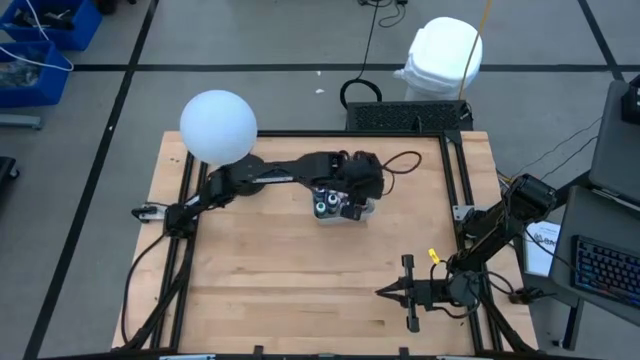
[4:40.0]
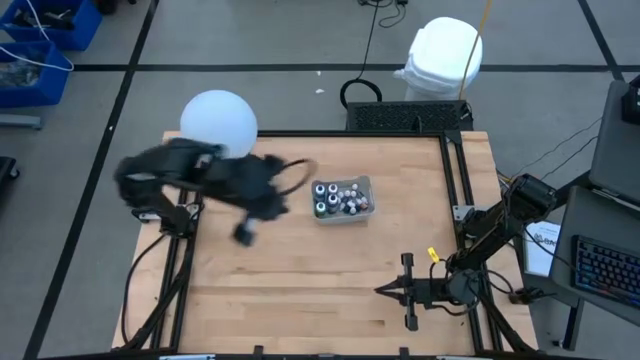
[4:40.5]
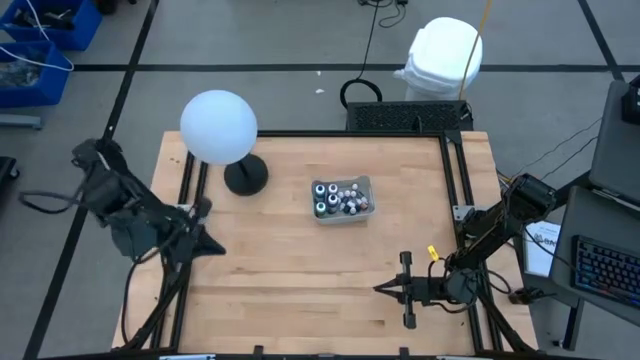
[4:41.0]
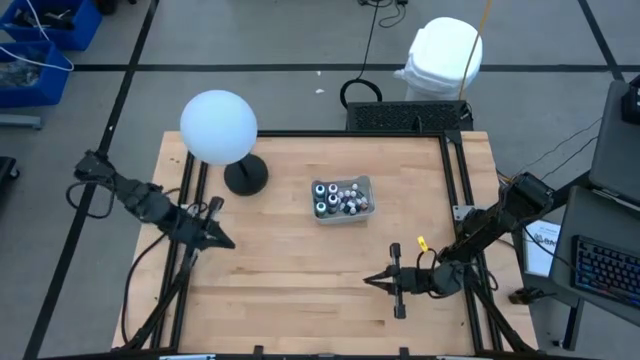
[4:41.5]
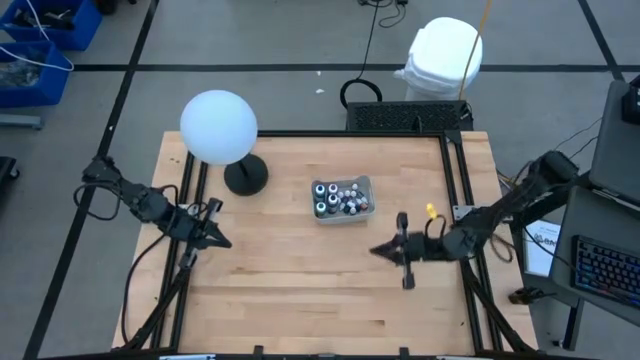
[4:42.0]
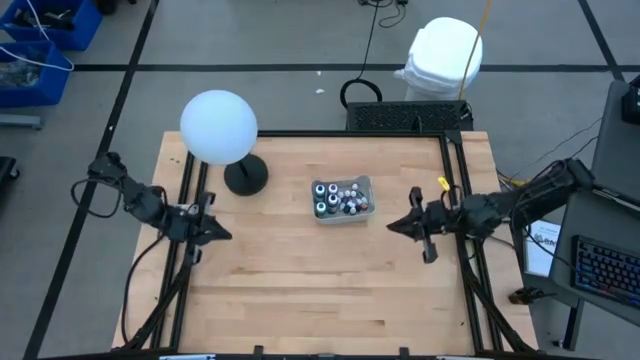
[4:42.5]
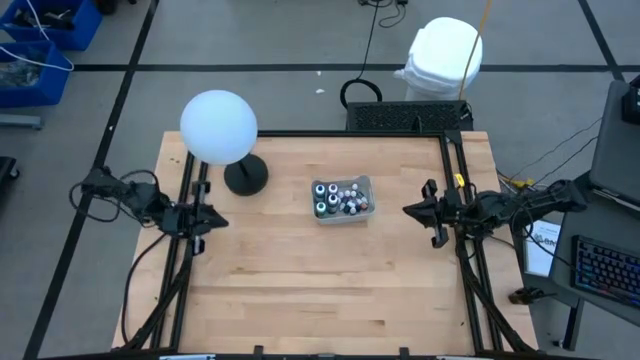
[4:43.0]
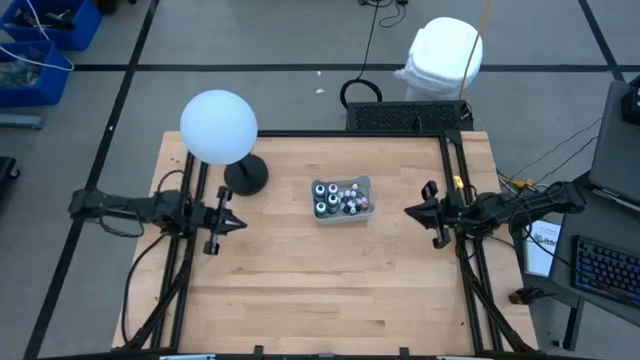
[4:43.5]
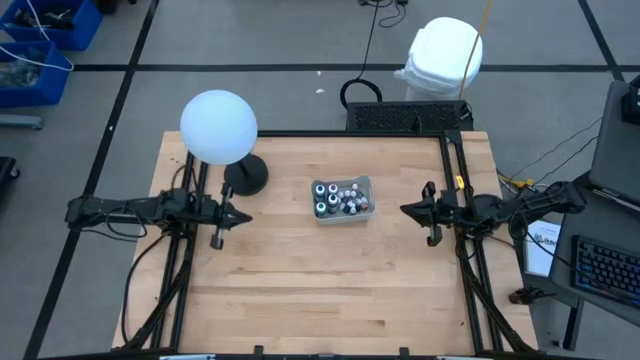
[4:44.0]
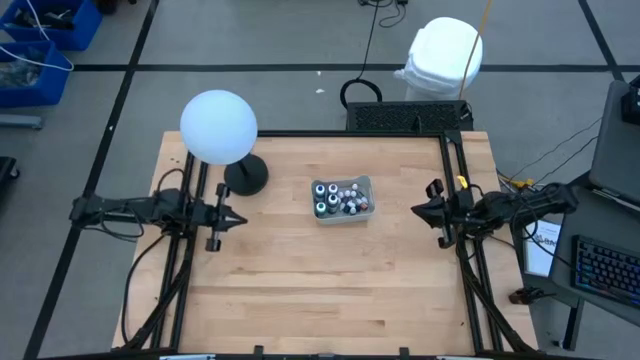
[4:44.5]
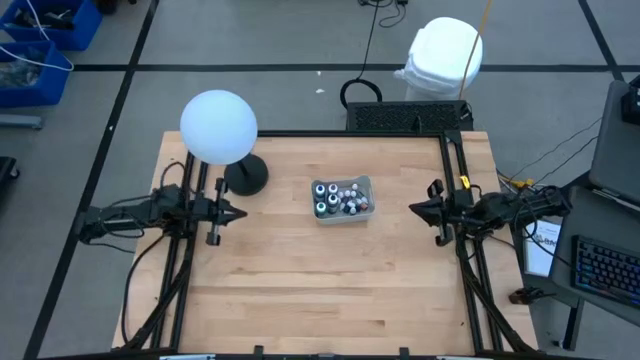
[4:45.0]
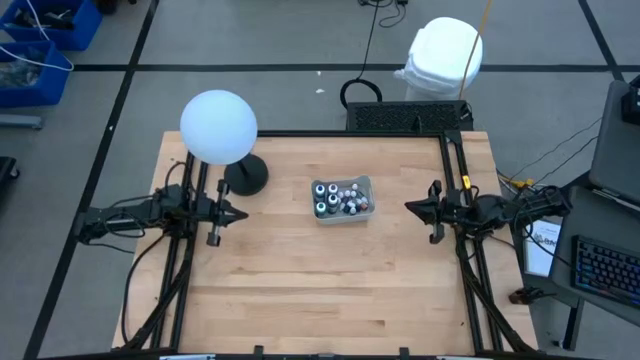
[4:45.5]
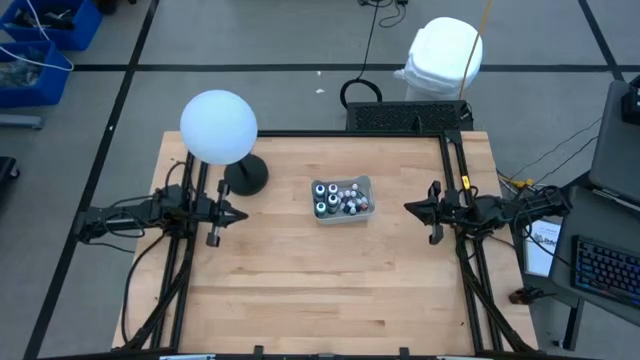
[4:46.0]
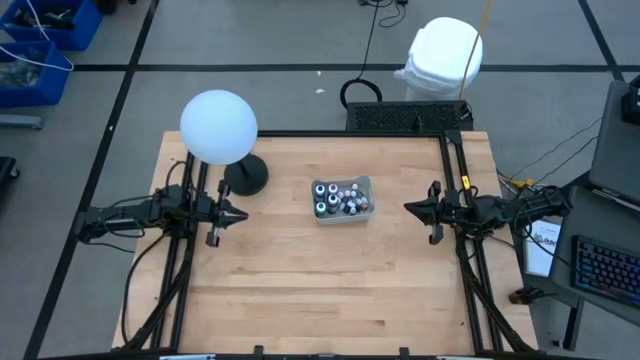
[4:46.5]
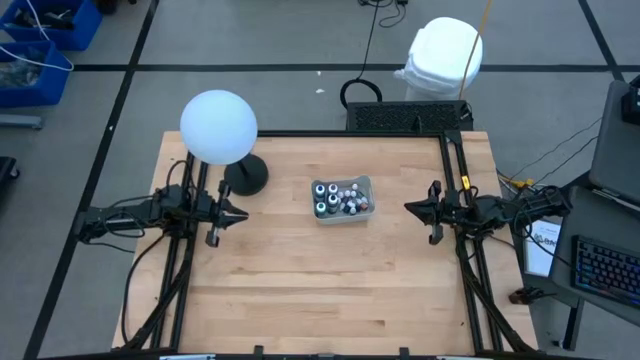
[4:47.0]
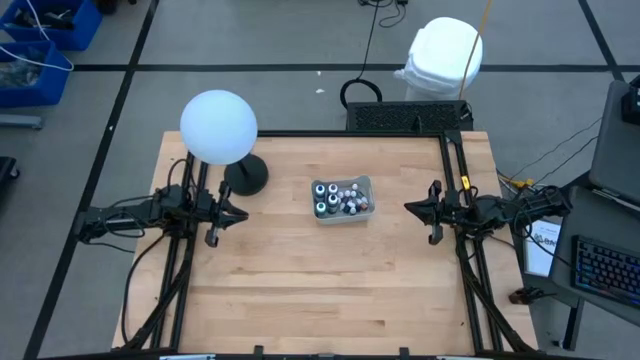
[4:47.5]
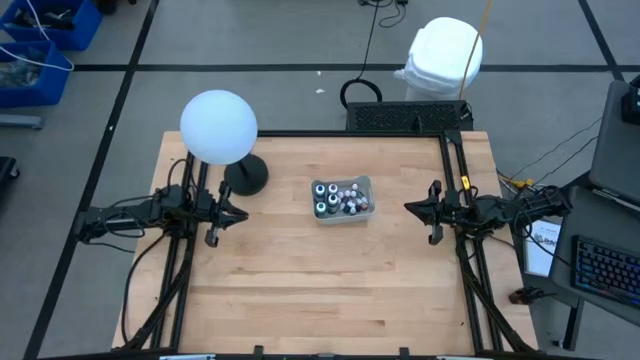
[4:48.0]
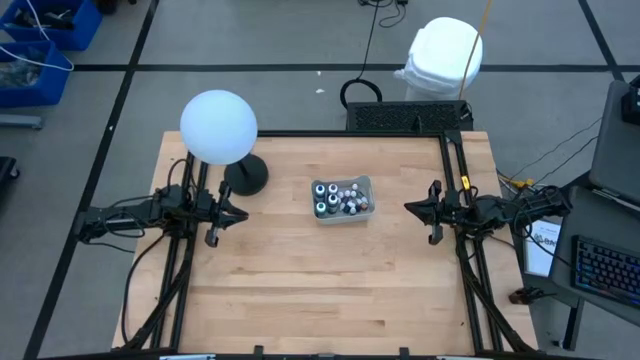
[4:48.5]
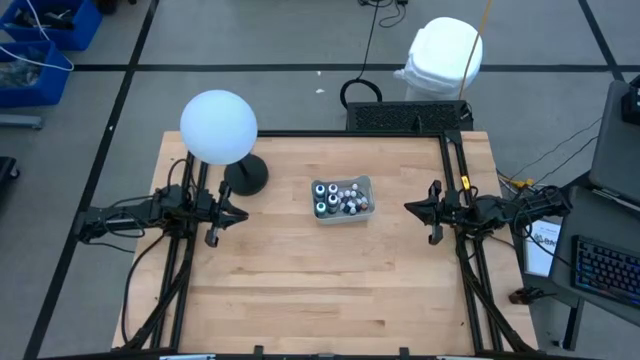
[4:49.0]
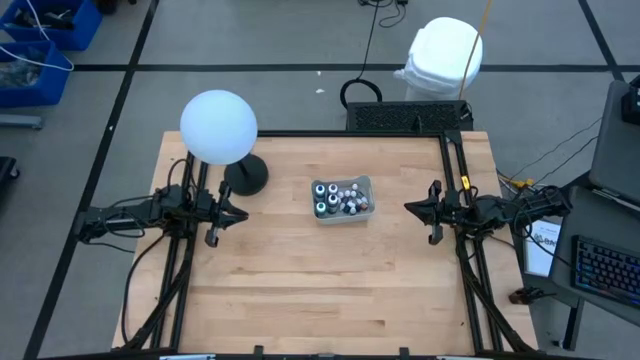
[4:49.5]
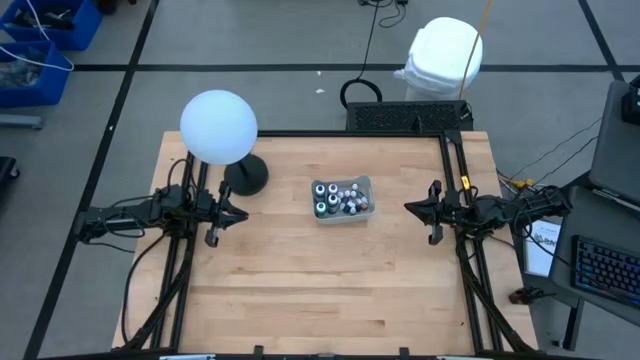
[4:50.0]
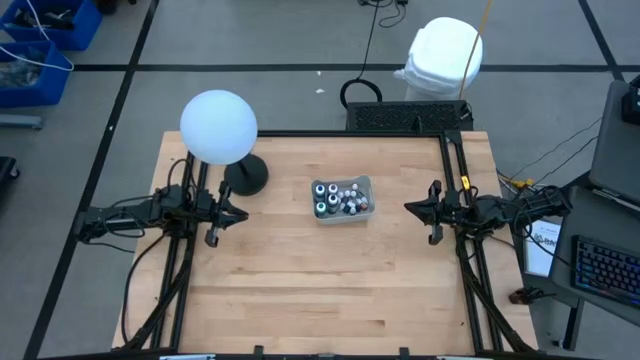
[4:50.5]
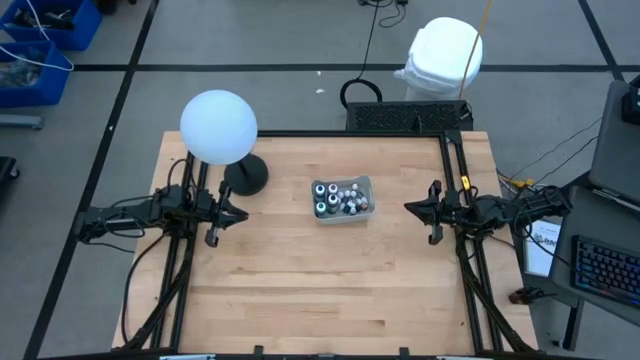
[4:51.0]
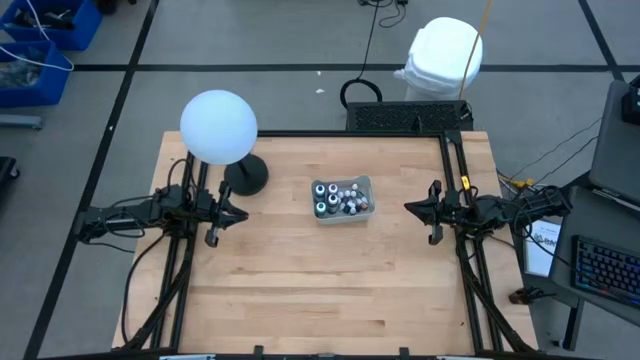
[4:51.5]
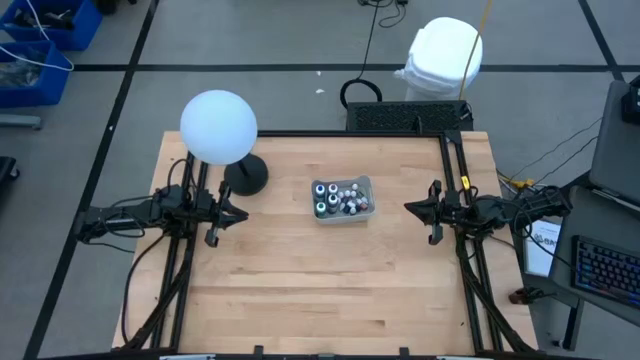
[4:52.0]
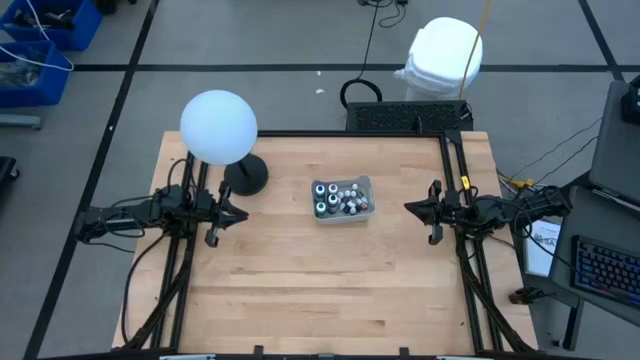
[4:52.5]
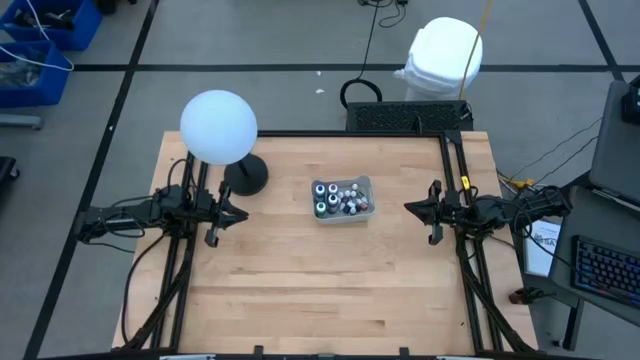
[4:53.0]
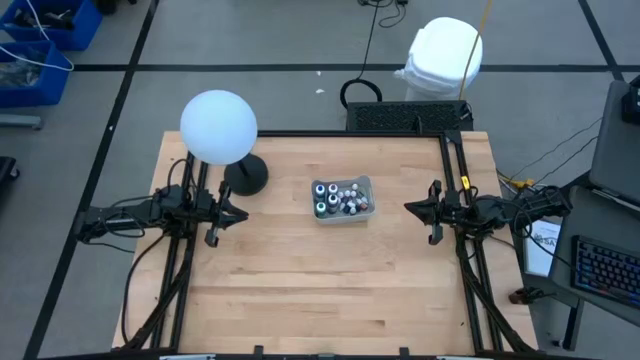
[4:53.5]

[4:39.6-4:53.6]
Task: Pick & Place food coloring
Return to Home Position

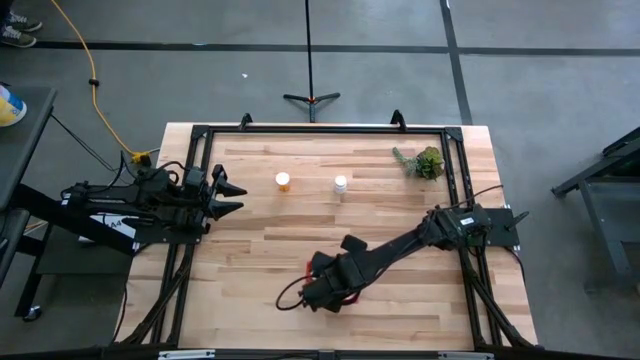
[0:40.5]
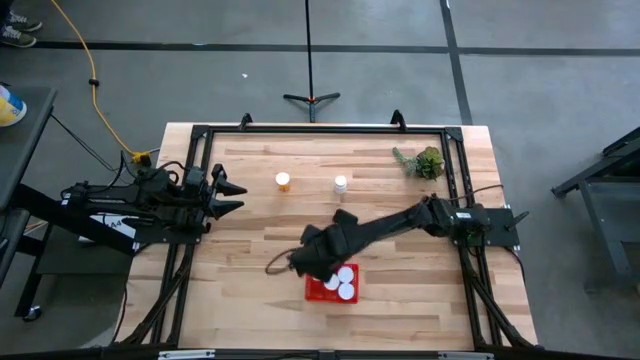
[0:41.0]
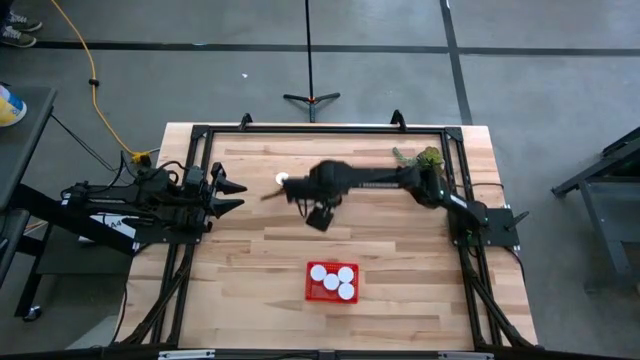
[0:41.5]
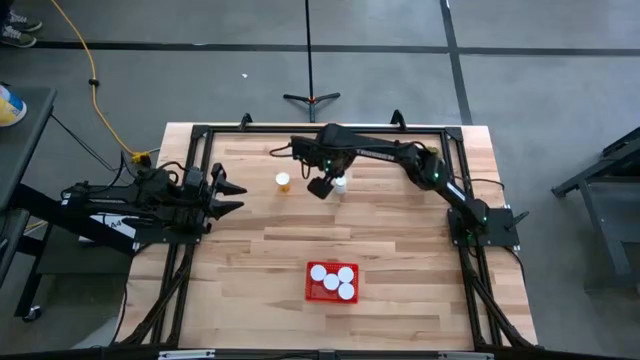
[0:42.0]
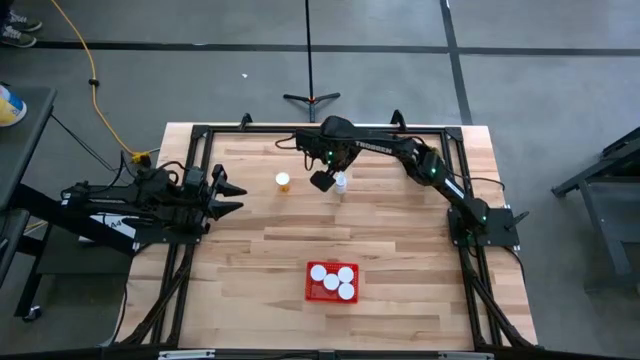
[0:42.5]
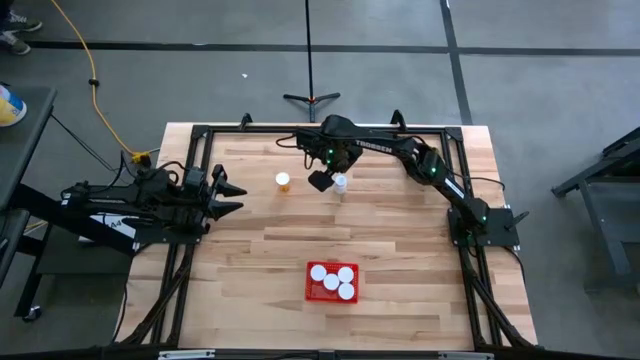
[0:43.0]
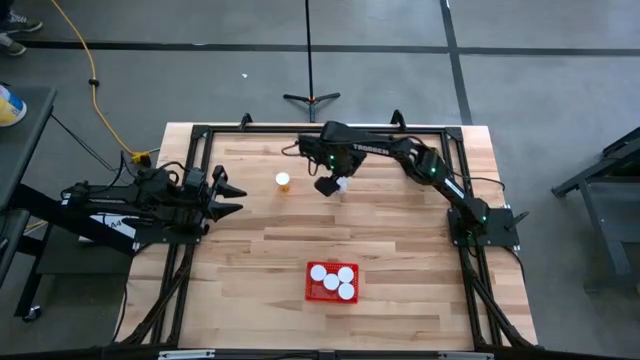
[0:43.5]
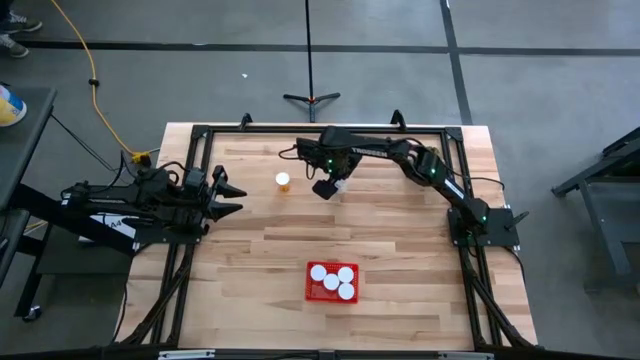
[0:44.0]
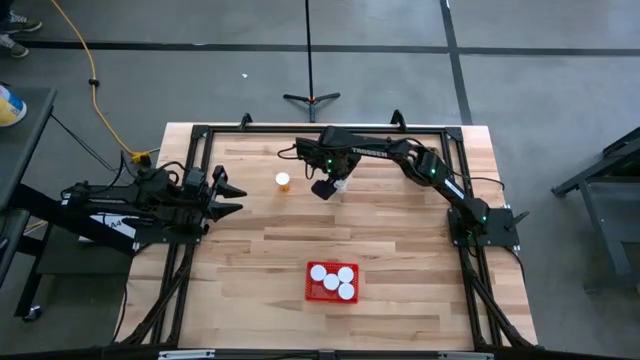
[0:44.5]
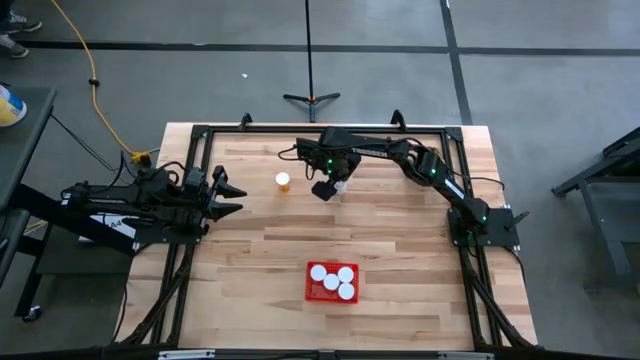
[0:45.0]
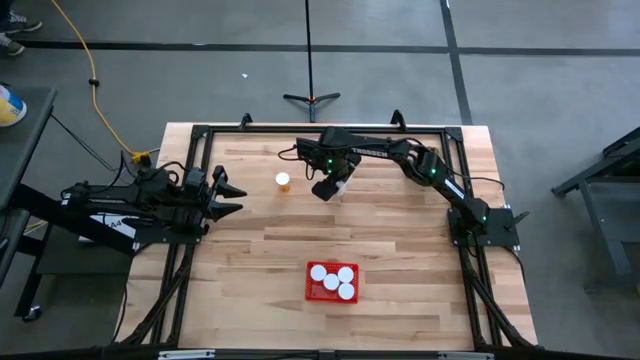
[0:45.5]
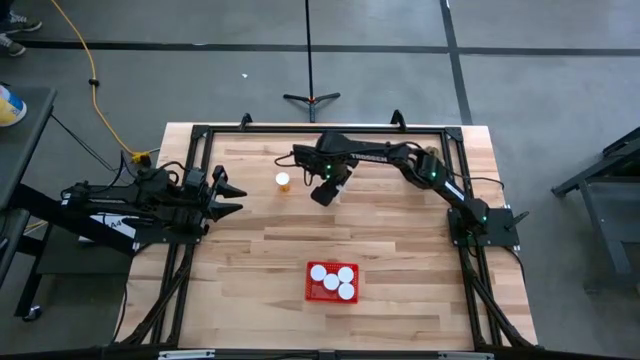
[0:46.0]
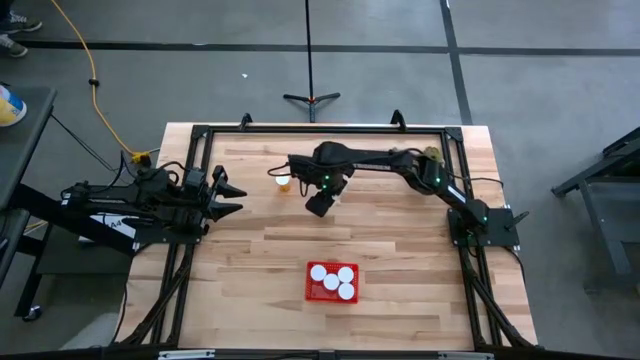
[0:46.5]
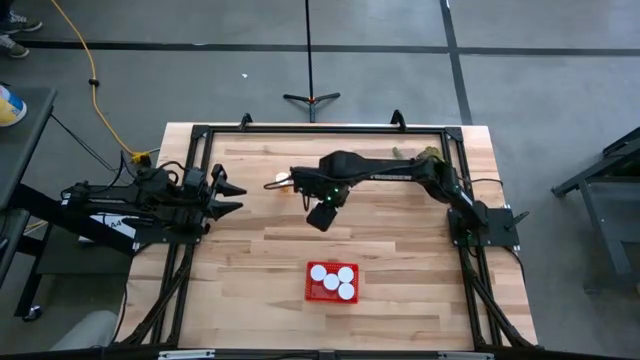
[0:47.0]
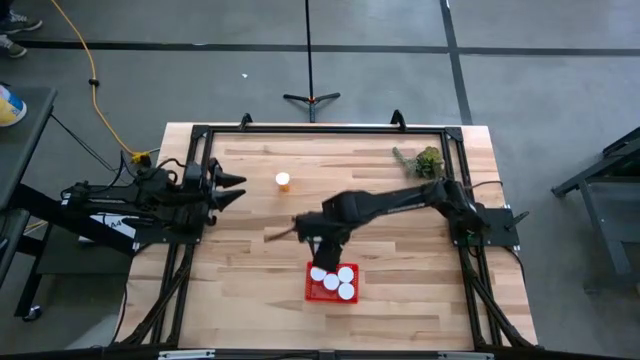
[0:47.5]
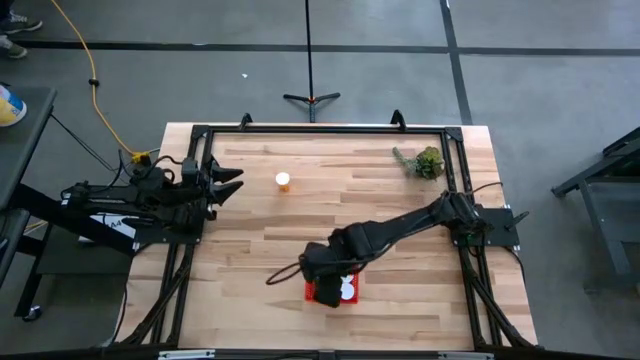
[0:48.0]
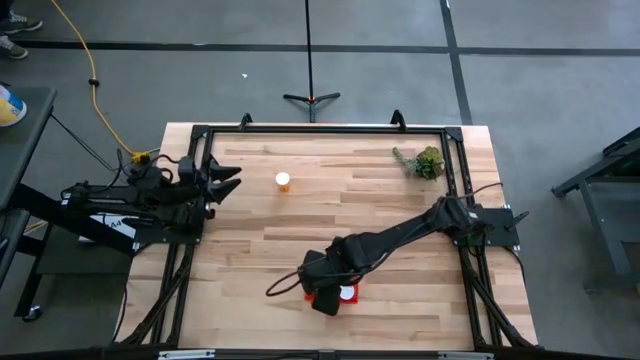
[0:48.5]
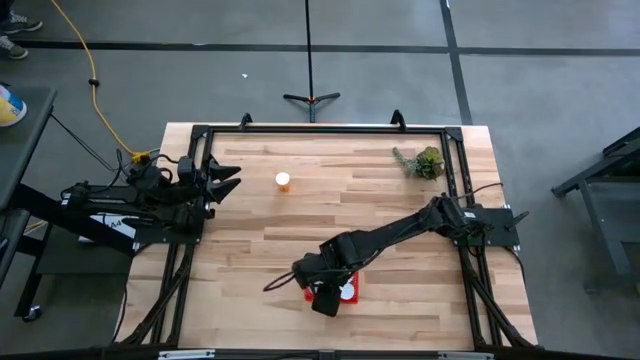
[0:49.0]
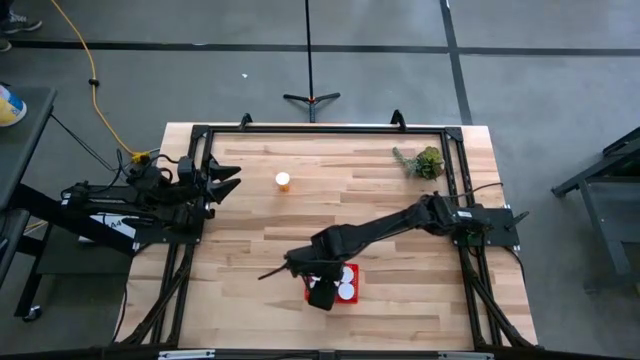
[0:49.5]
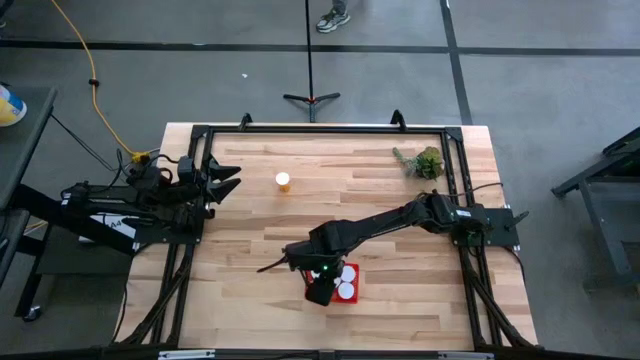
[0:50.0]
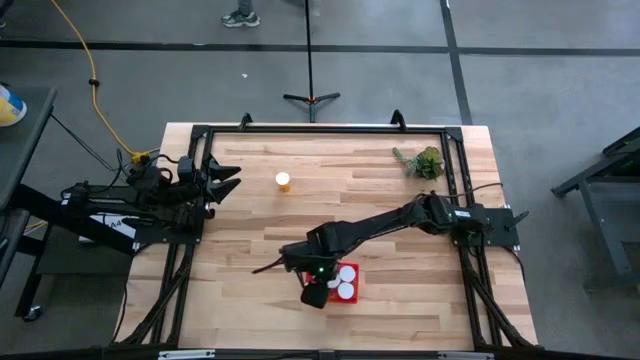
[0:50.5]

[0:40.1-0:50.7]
Task: Pick and place pill bottles into a basket
Put the white medicine bottle into the red basket
